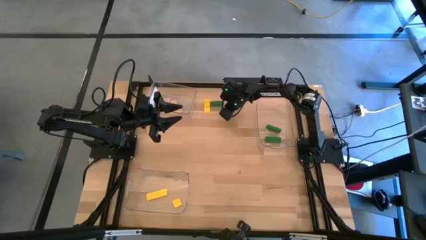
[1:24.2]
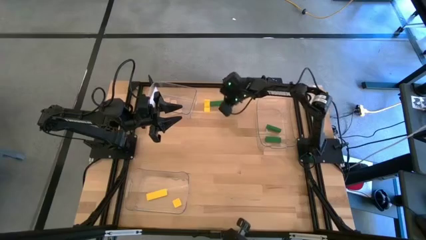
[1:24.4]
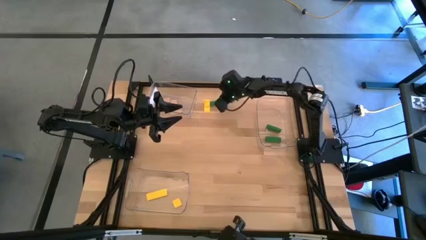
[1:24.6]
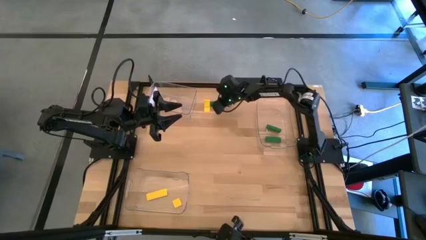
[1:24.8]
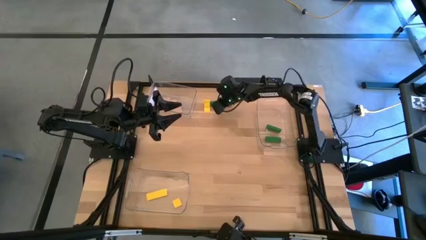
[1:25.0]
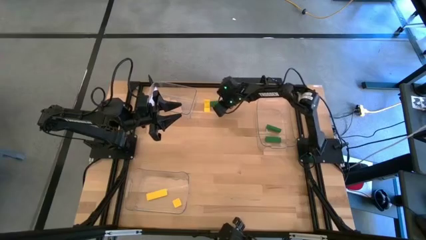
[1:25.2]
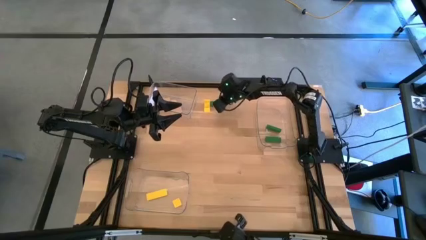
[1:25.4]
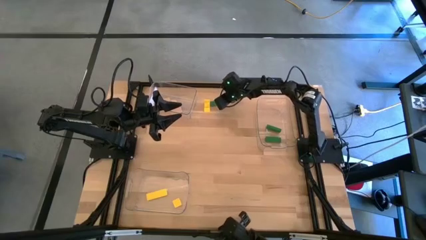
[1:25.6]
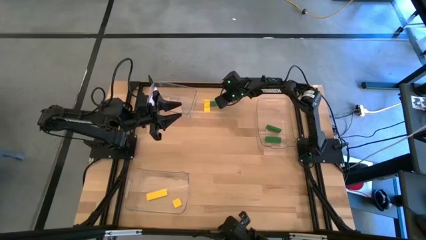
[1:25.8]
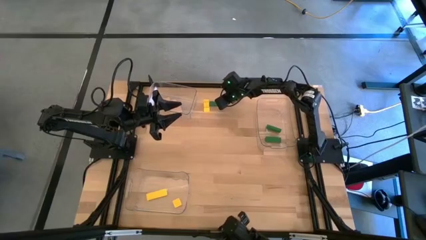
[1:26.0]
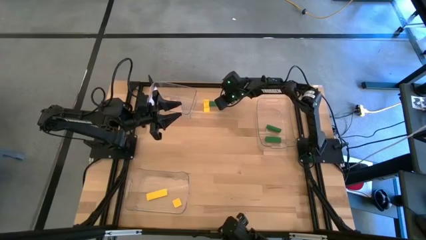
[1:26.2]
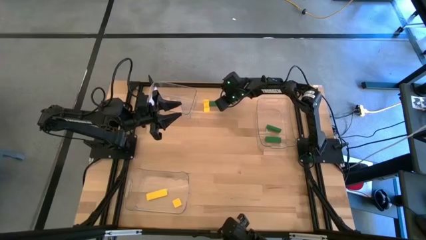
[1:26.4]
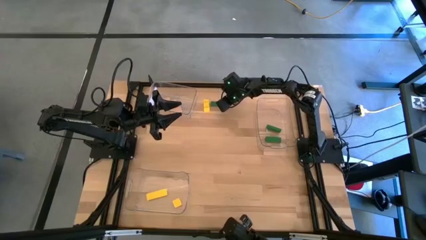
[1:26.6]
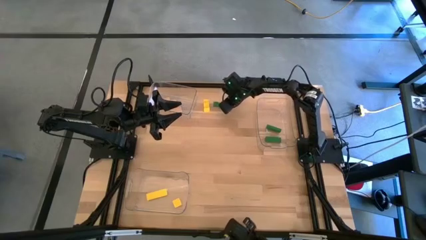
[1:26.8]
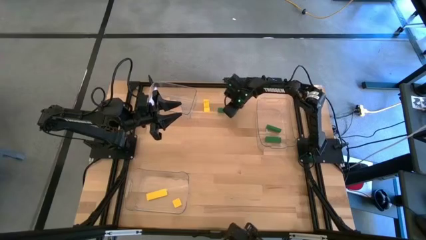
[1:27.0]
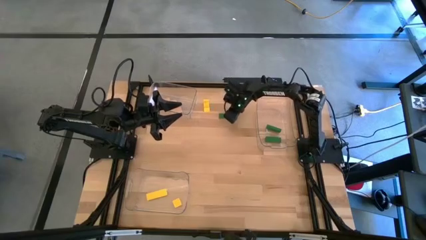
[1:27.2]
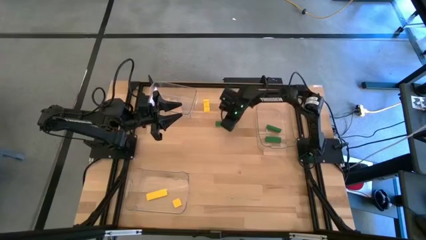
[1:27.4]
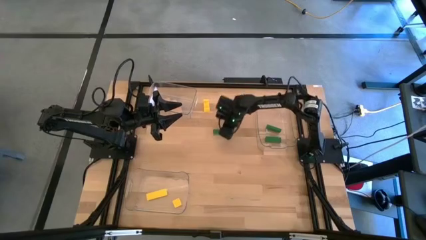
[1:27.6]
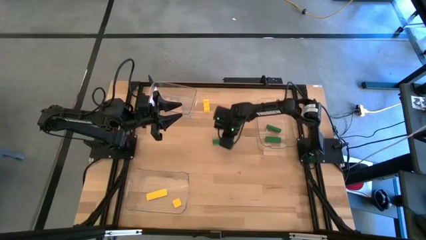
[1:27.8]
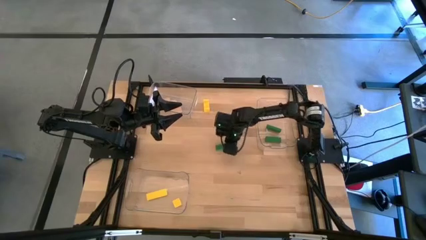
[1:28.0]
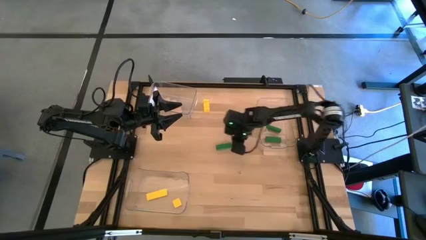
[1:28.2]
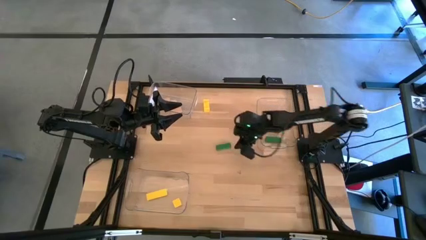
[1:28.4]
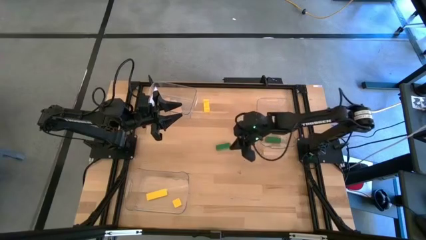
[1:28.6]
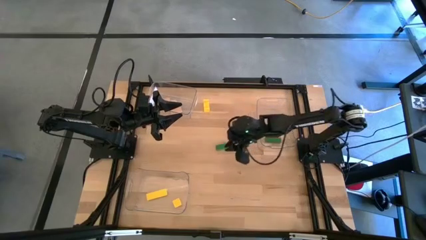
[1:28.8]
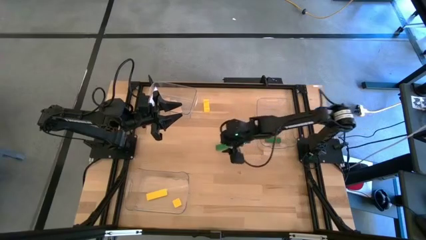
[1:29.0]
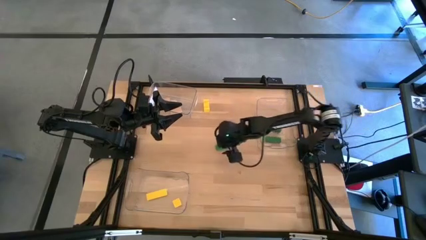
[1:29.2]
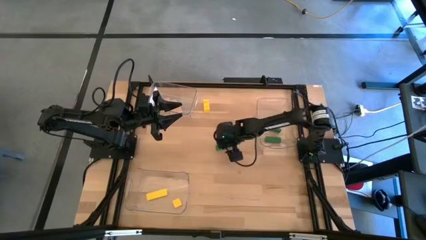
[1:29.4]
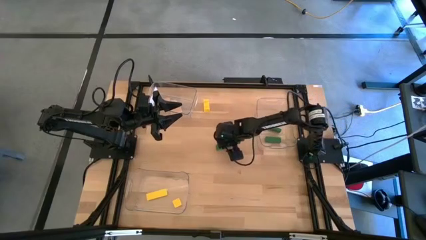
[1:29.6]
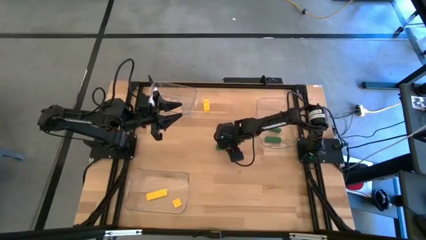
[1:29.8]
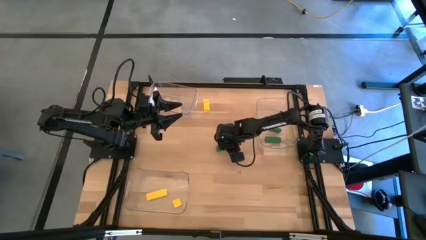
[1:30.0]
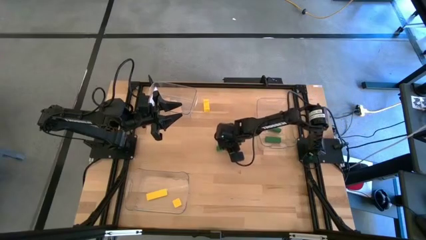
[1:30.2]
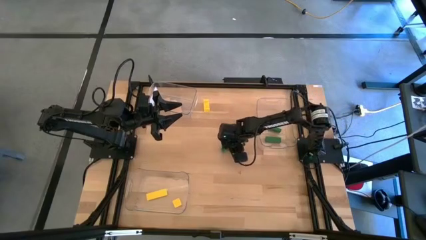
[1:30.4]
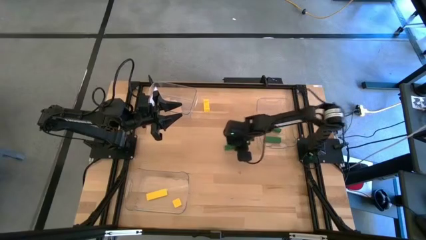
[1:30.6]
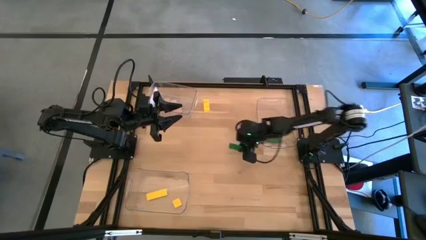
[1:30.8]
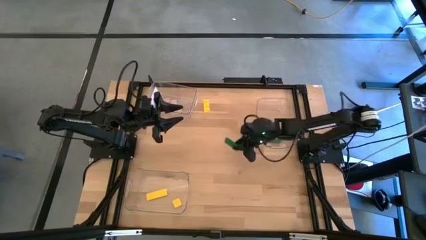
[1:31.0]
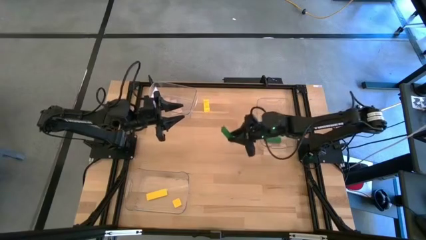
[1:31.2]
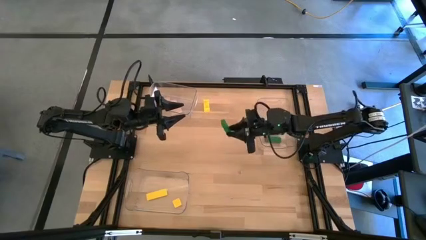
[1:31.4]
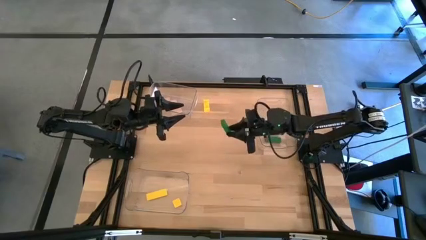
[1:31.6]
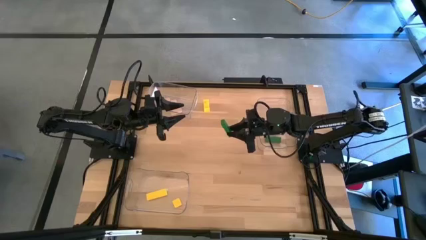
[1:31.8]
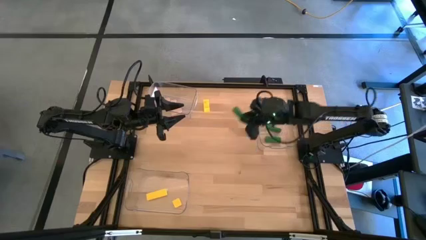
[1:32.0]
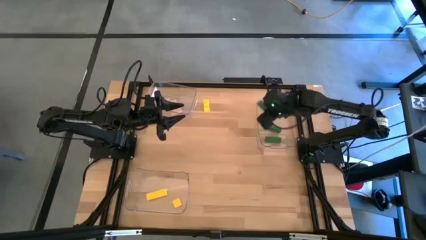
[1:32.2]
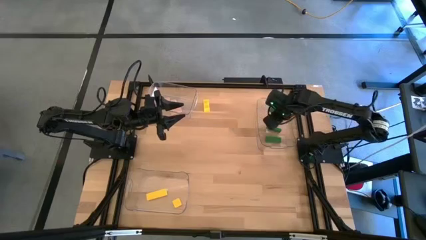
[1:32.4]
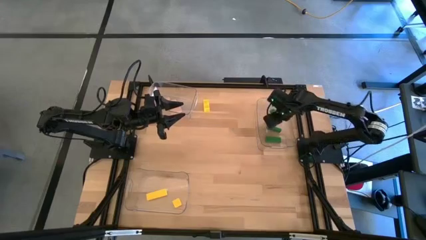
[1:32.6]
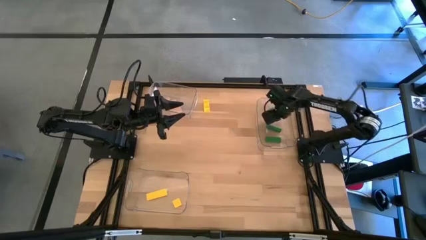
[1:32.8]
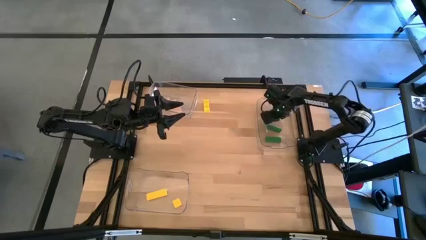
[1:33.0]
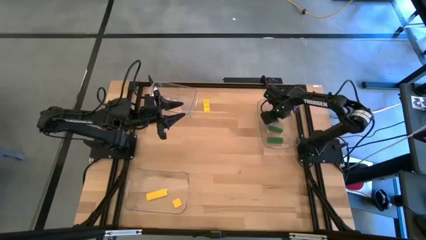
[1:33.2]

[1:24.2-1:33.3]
Task: Sort & place blocks by color
Put the green block into the top right transparent bin

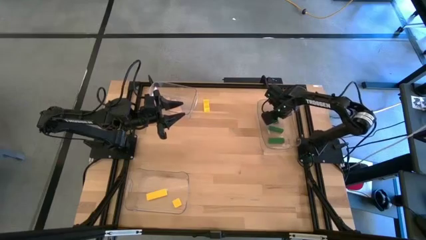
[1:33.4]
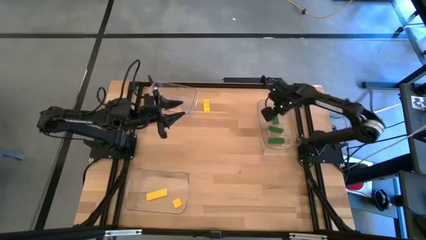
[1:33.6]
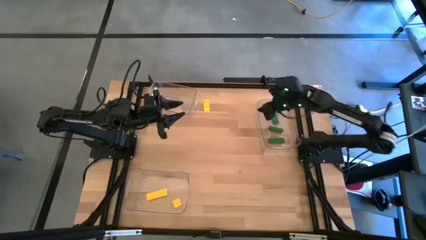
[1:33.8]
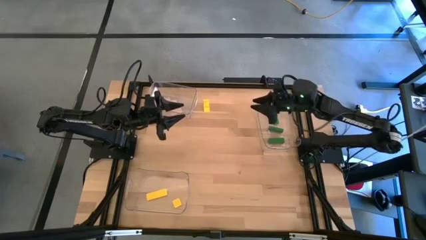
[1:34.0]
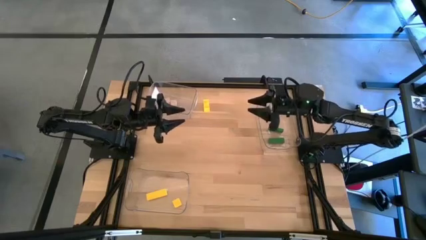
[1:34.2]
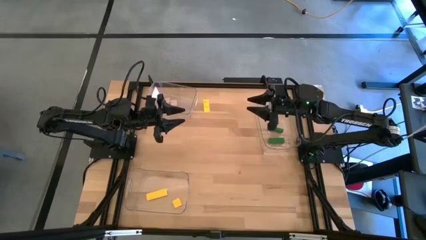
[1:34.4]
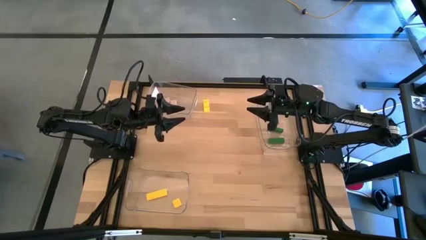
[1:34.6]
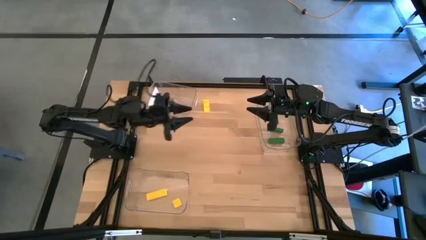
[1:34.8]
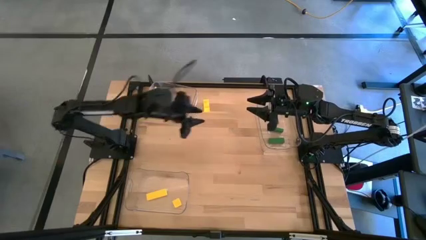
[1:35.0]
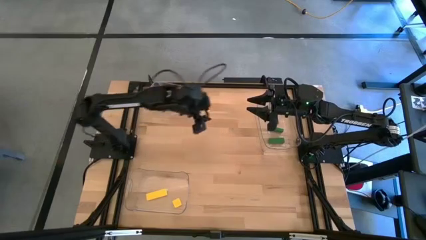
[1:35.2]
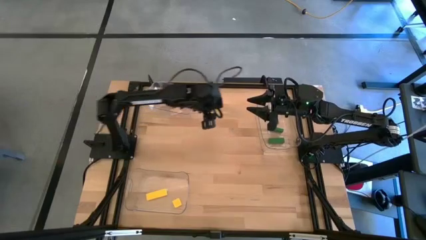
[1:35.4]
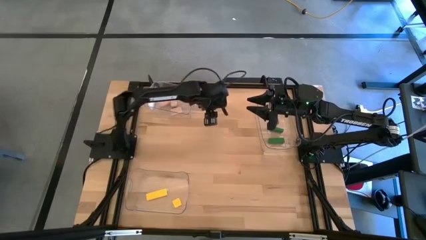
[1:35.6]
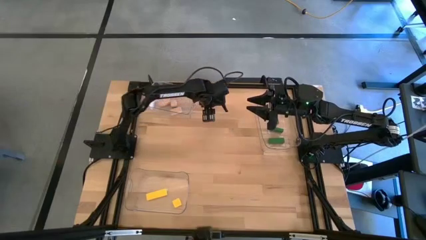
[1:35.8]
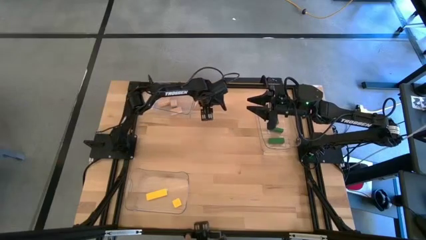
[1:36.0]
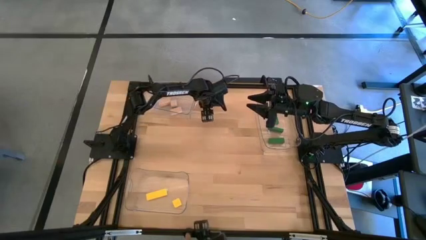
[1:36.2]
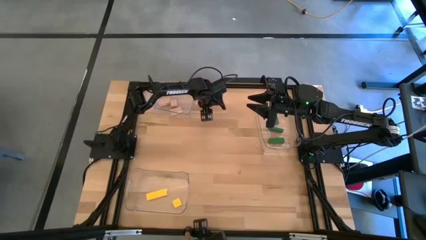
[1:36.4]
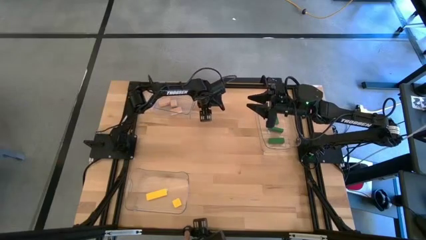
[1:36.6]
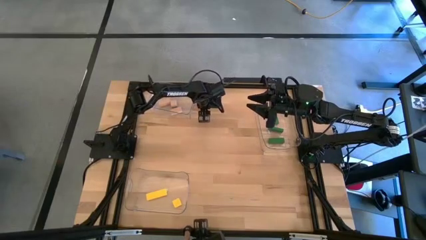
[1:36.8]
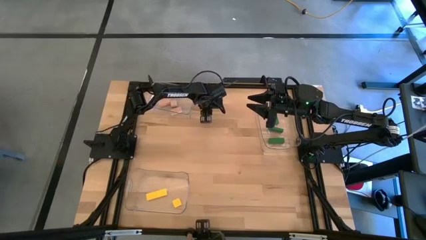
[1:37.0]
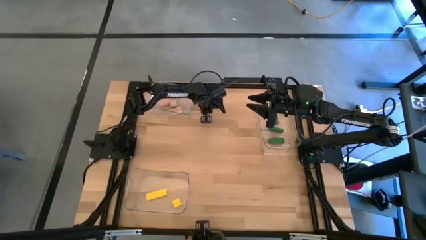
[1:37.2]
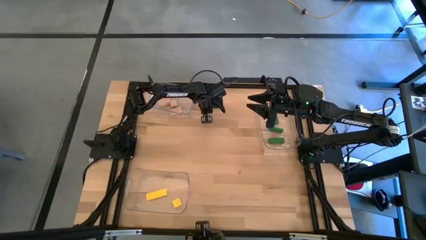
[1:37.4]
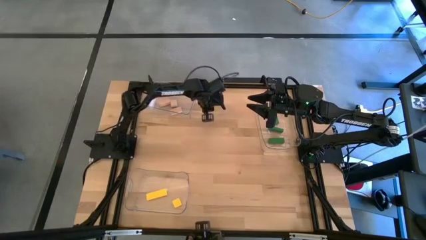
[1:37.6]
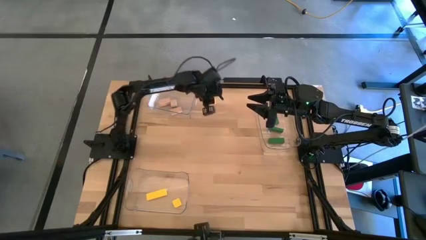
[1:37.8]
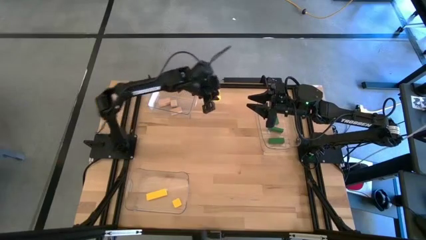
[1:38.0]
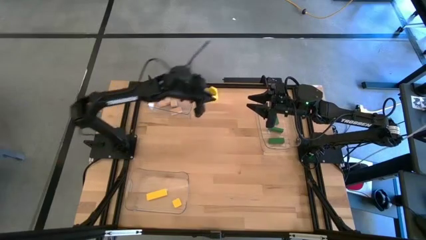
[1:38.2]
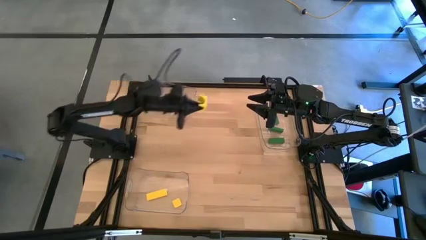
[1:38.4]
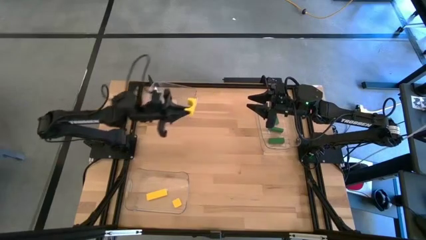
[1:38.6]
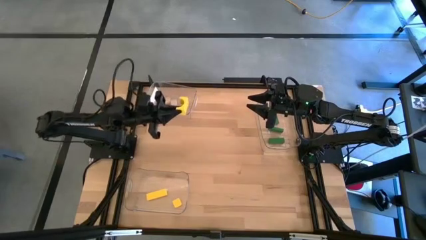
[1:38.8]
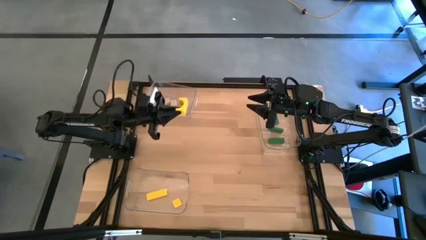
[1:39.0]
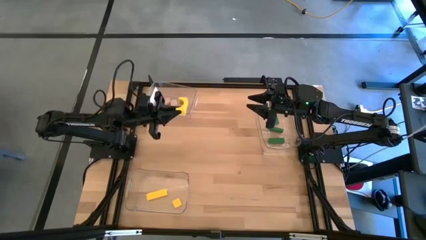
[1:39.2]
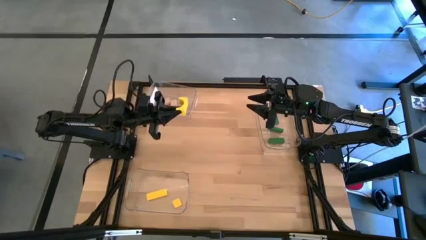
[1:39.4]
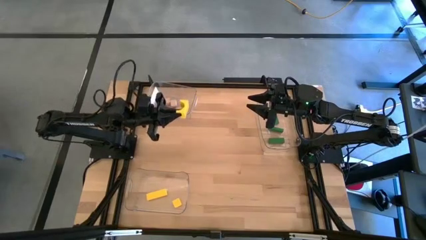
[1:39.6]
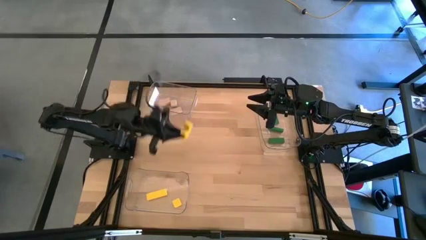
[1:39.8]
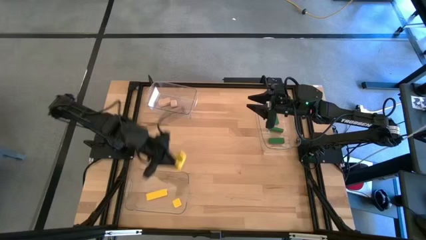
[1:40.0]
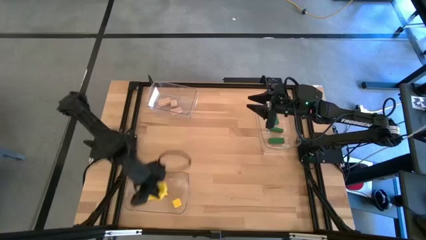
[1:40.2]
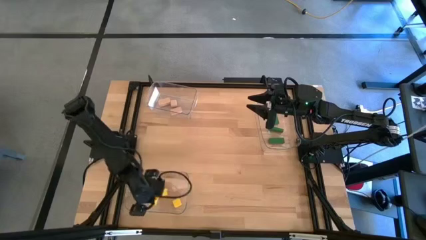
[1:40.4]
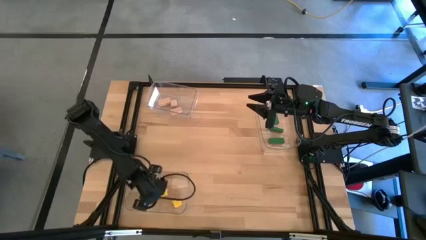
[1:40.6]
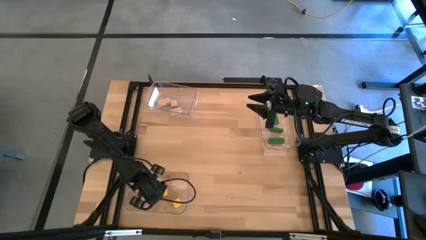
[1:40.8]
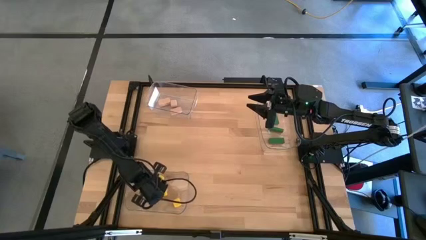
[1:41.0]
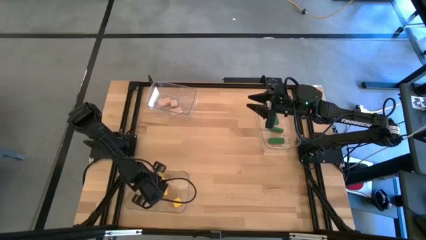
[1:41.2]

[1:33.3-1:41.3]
Put the yellow block into the bottom left transparent bin
